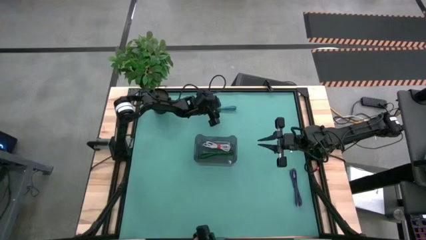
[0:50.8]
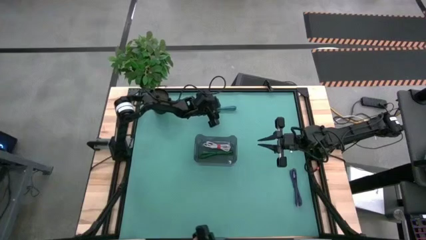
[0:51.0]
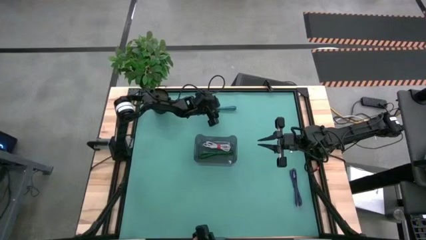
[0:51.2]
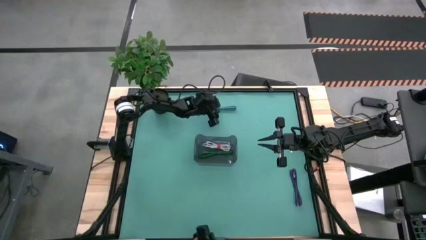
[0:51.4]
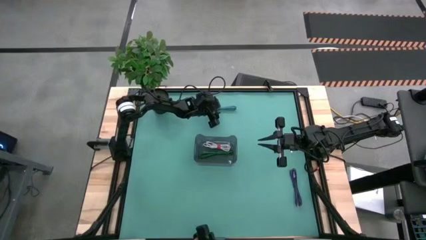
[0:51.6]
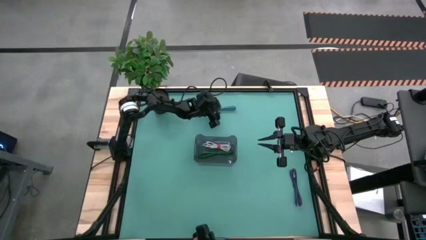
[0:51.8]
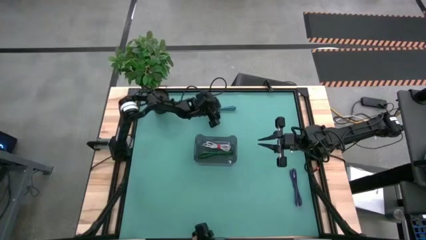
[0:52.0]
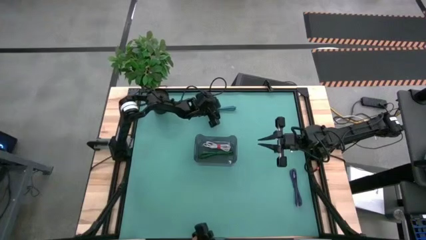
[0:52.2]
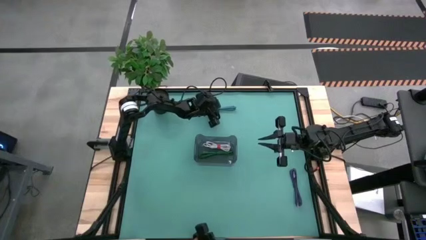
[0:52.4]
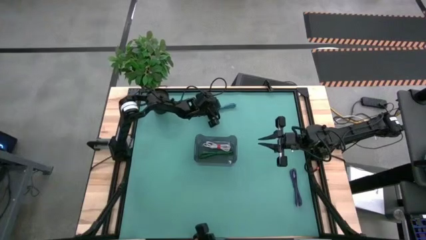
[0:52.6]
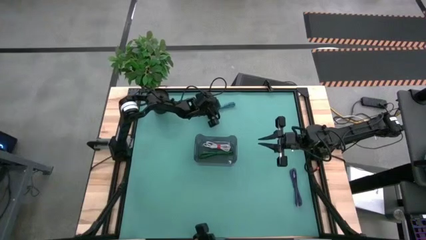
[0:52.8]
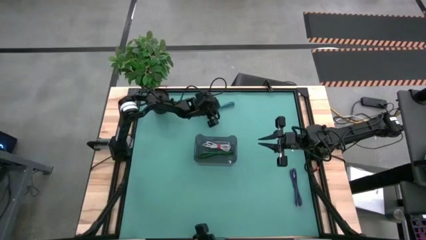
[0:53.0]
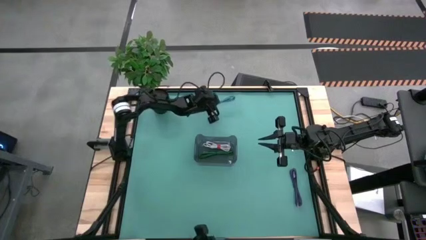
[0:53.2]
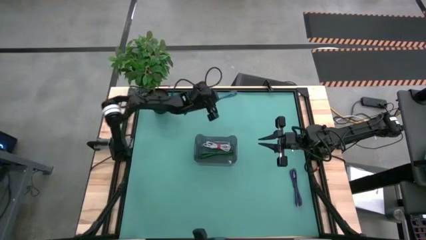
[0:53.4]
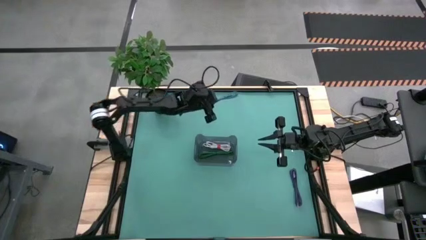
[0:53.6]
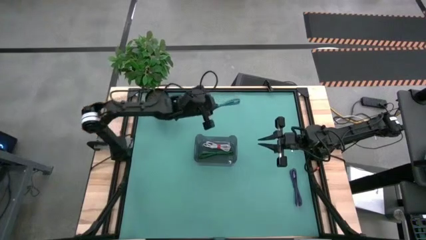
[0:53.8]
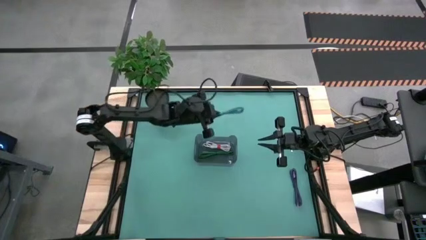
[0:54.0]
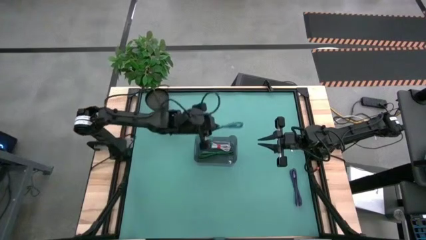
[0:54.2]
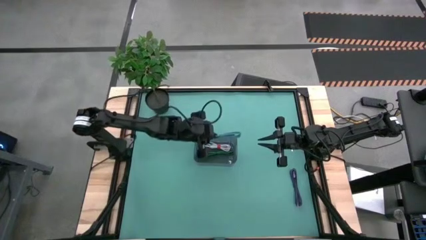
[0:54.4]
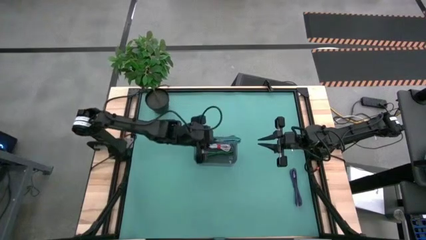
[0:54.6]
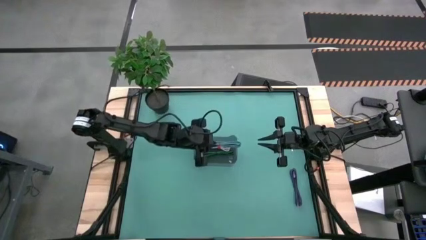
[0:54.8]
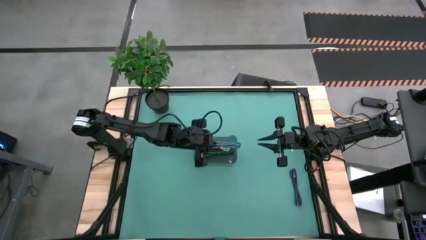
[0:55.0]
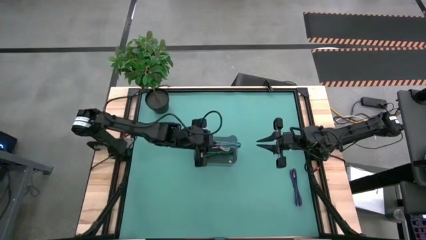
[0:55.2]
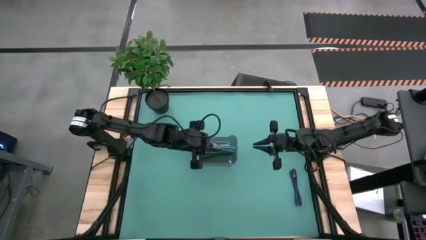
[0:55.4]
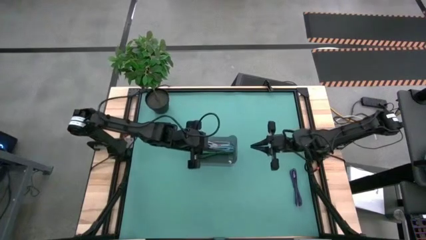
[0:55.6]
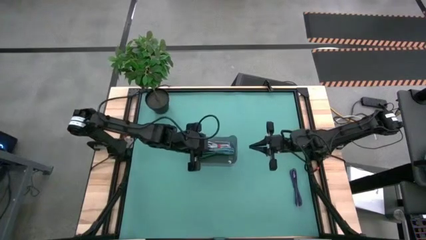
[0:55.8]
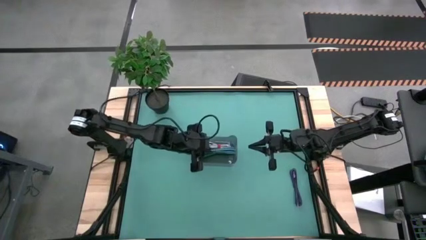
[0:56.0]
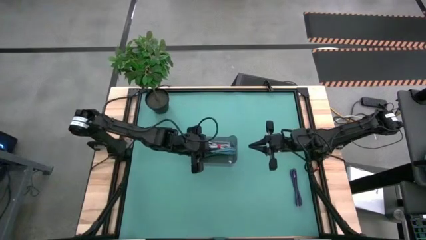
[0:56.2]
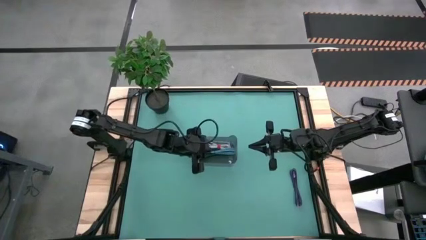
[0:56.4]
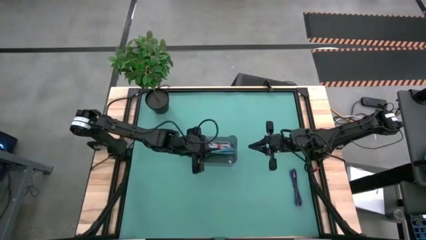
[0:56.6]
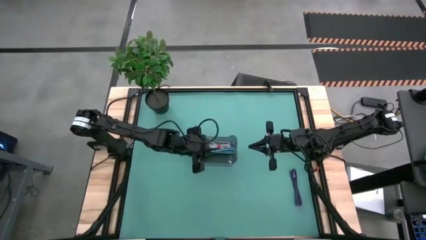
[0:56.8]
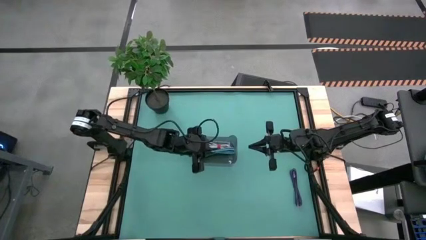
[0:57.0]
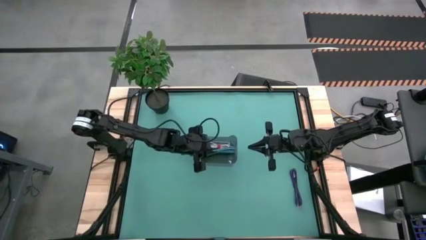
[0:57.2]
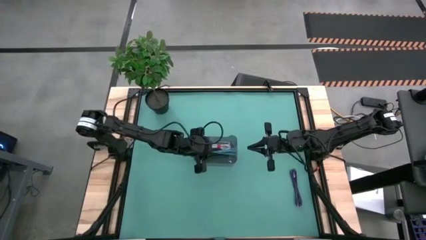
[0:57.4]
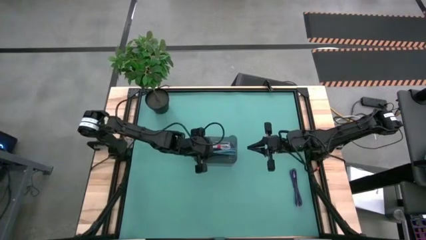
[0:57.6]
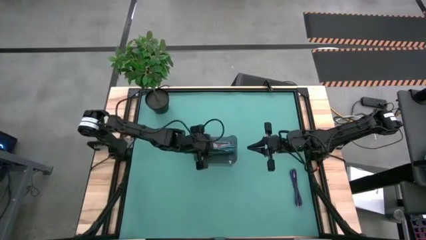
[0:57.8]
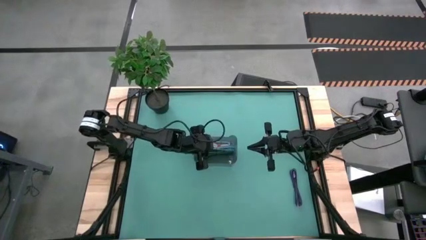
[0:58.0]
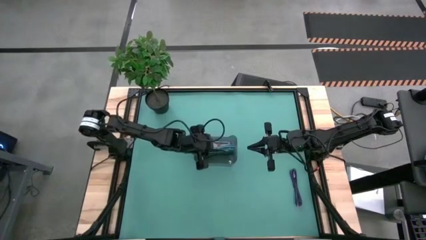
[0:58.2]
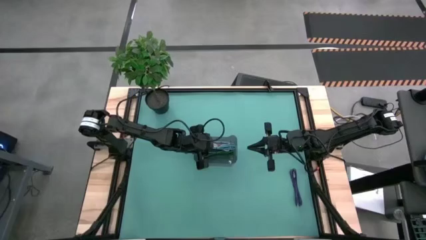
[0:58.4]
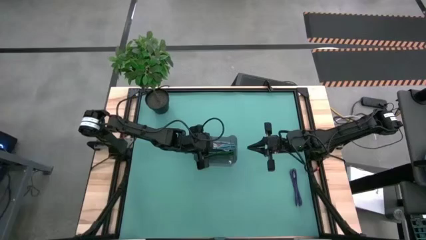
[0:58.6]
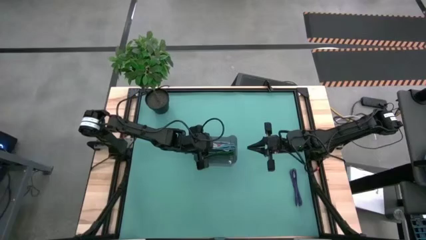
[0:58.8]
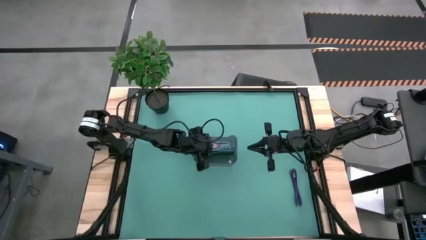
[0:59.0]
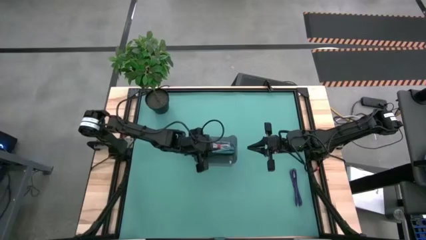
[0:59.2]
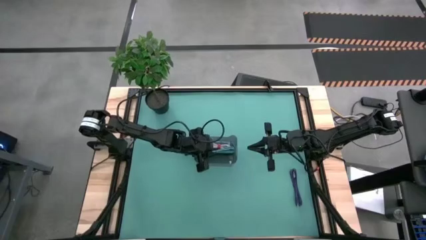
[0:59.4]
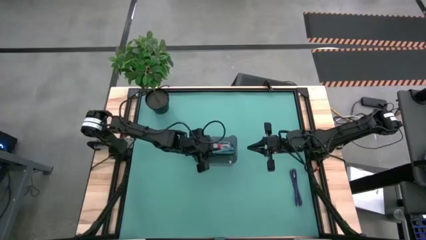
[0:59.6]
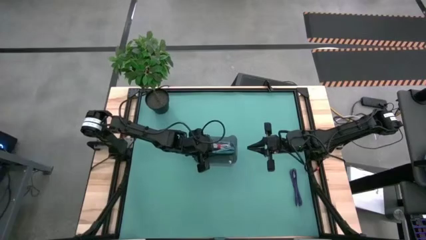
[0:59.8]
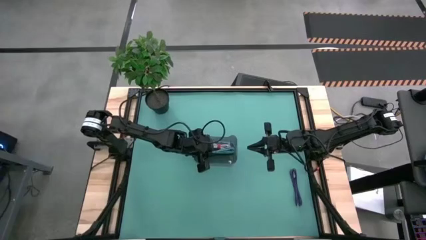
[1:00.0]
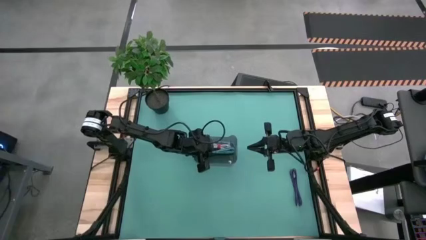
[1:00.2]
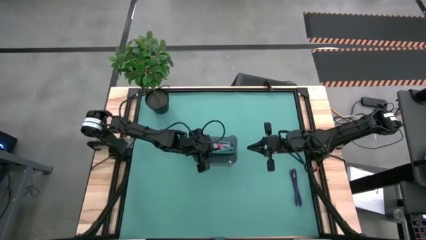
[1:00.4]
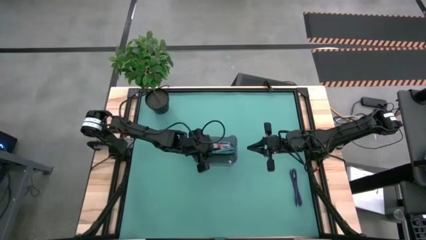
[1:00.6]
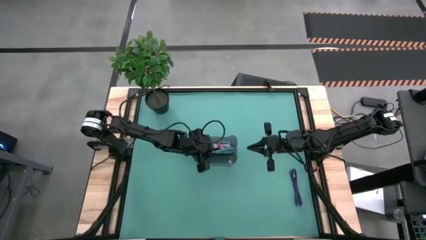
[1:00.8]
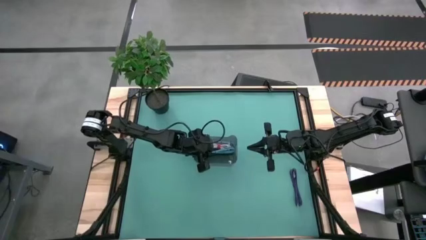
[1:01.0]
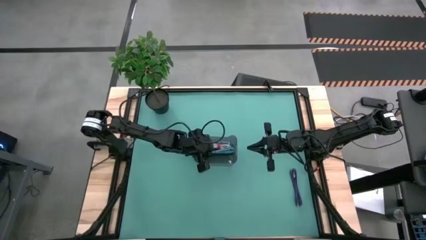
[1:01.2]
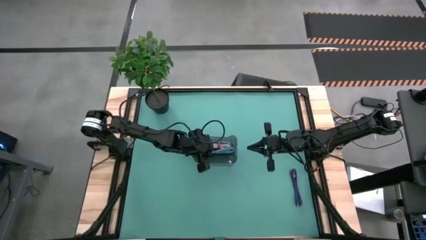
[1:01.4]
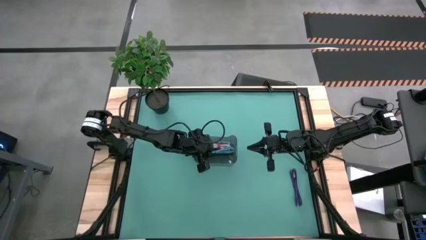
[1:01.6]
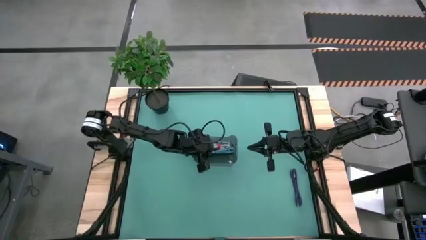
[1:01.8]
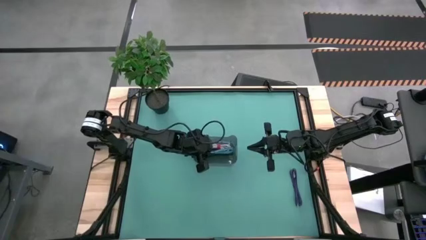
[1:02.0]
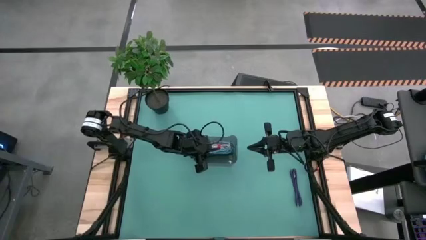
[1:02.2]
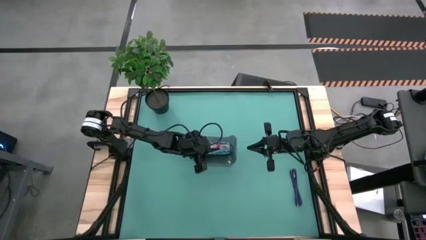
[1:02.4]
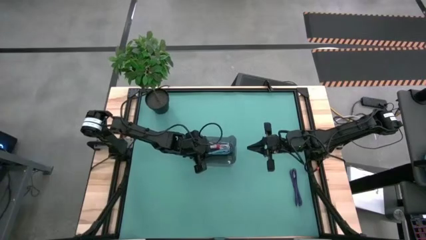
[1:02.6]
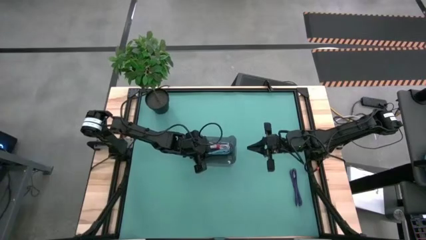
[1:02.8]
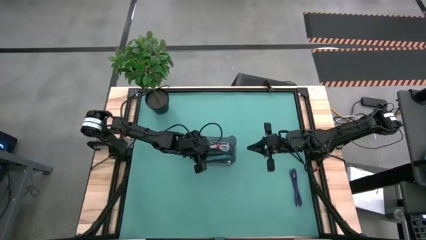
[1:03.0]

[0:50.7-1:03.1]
Task: Pick and place USB-C Cables
Put the blue cable into the black transparent container
